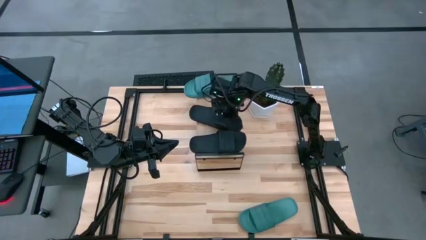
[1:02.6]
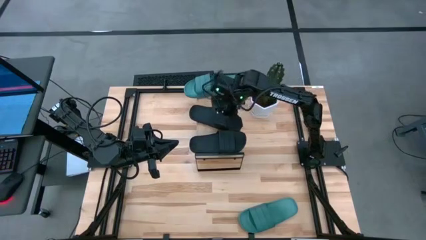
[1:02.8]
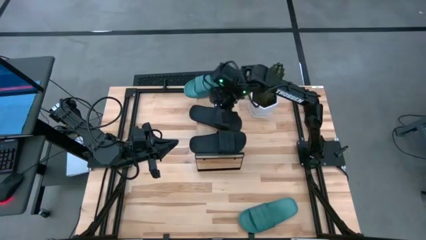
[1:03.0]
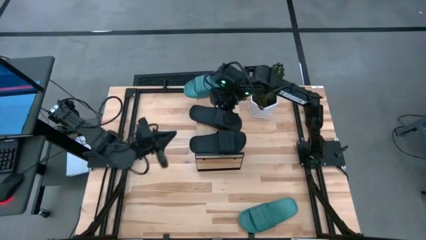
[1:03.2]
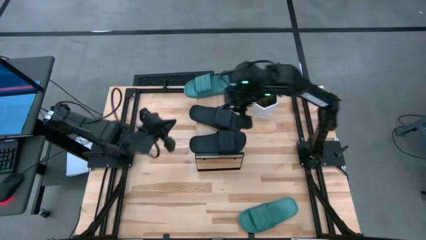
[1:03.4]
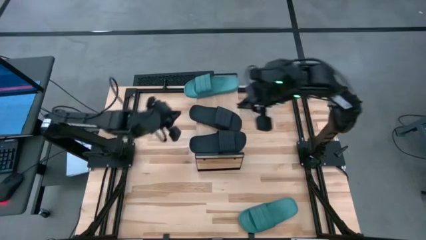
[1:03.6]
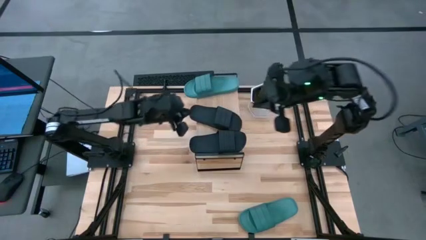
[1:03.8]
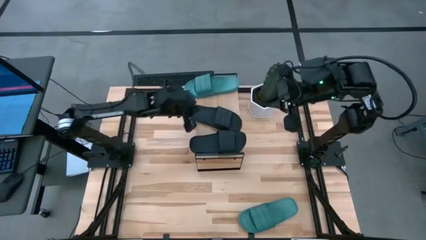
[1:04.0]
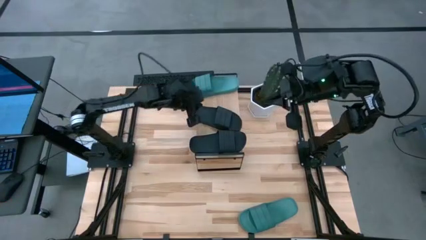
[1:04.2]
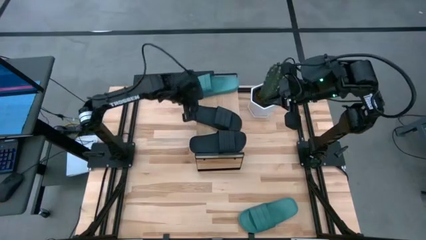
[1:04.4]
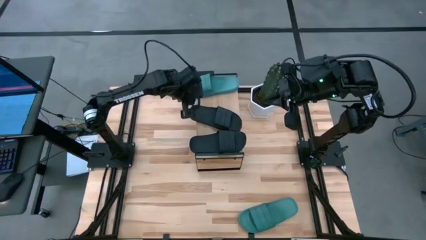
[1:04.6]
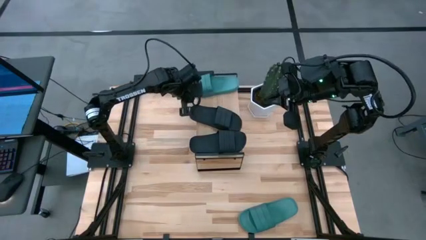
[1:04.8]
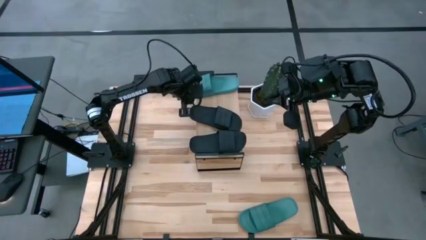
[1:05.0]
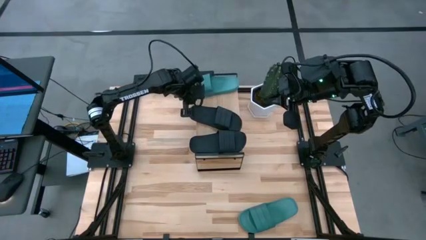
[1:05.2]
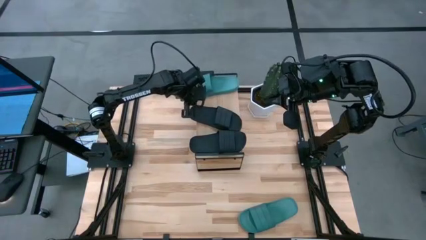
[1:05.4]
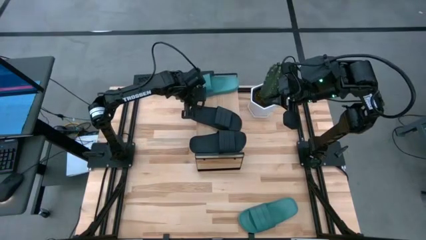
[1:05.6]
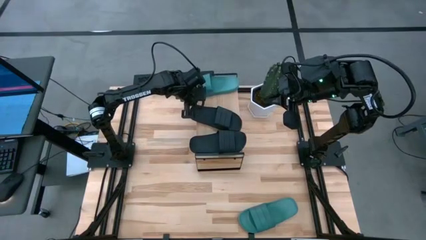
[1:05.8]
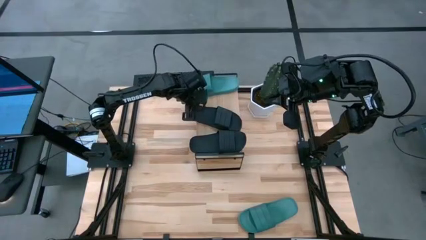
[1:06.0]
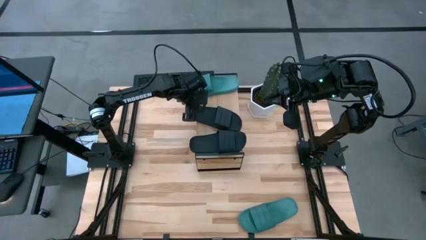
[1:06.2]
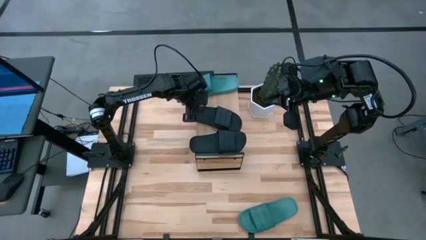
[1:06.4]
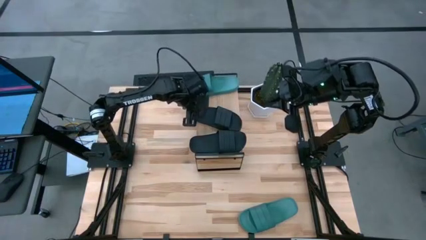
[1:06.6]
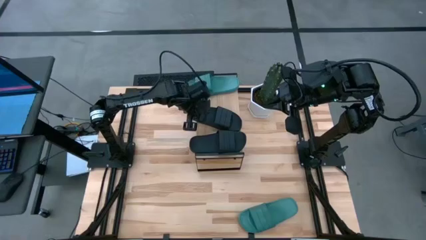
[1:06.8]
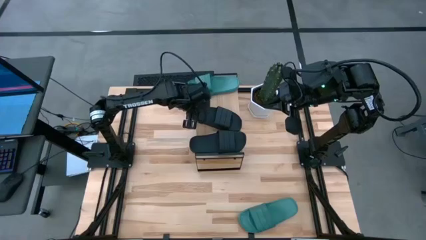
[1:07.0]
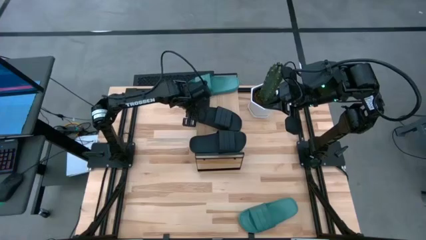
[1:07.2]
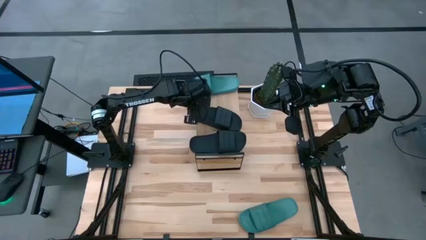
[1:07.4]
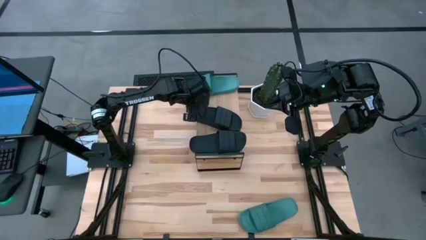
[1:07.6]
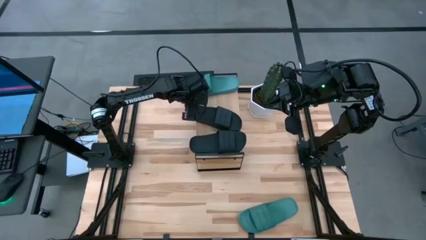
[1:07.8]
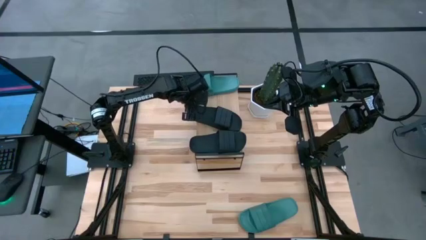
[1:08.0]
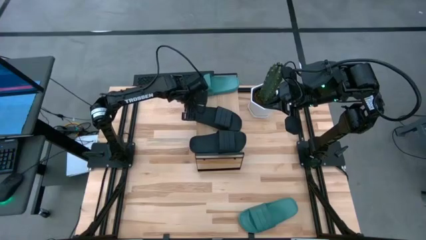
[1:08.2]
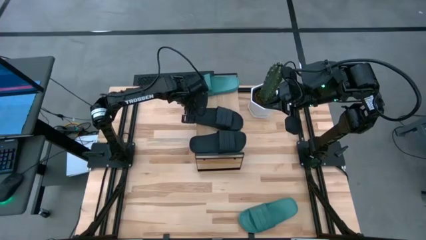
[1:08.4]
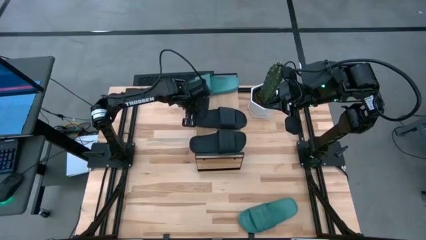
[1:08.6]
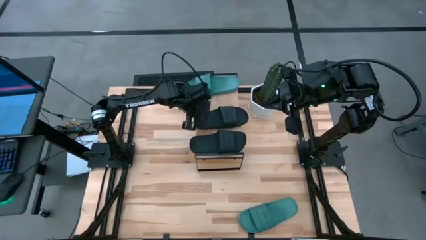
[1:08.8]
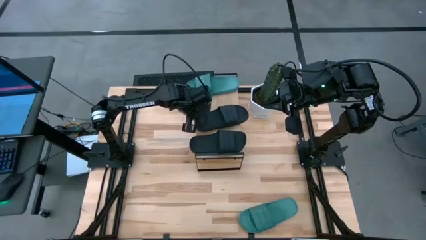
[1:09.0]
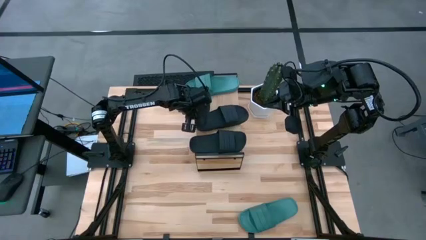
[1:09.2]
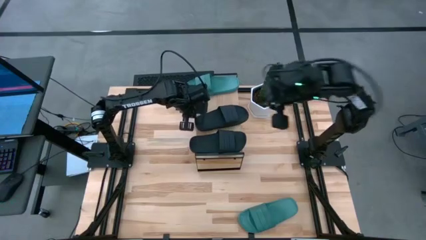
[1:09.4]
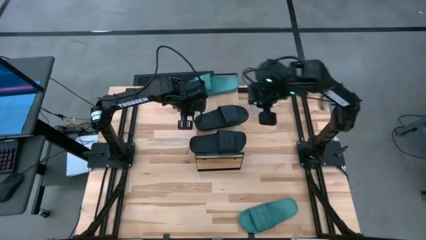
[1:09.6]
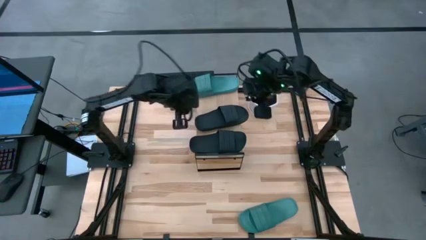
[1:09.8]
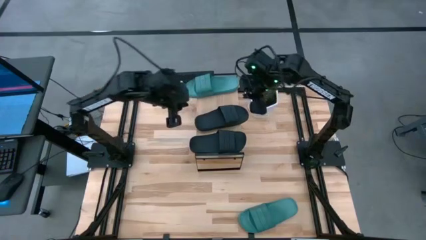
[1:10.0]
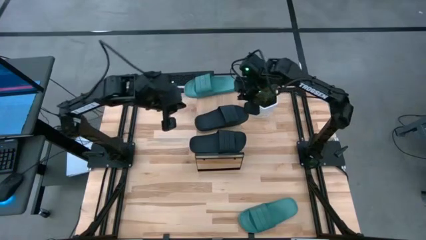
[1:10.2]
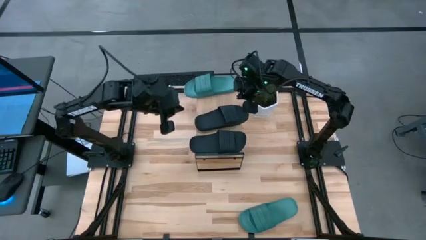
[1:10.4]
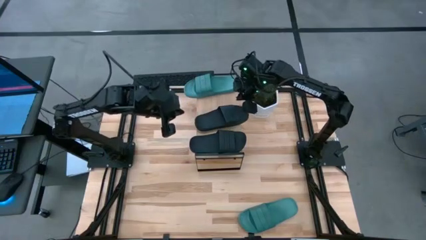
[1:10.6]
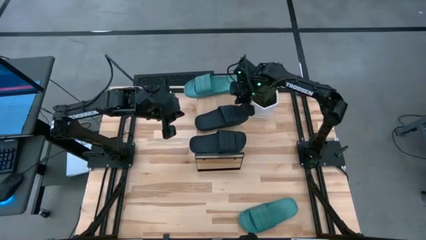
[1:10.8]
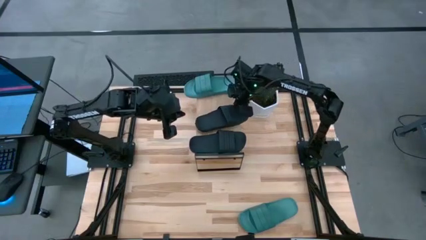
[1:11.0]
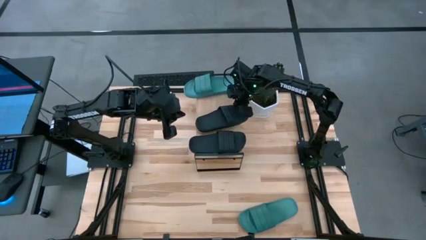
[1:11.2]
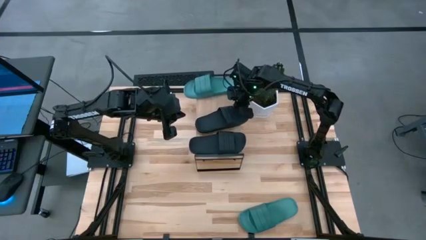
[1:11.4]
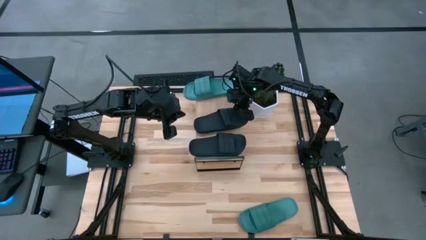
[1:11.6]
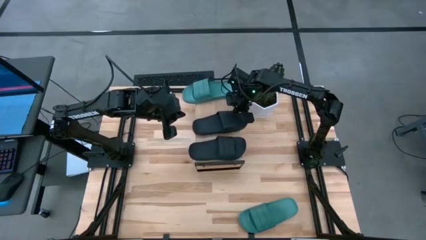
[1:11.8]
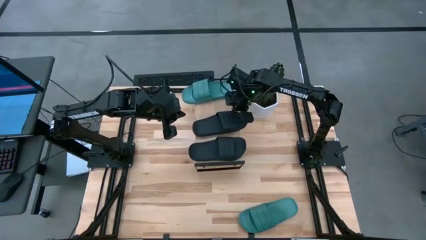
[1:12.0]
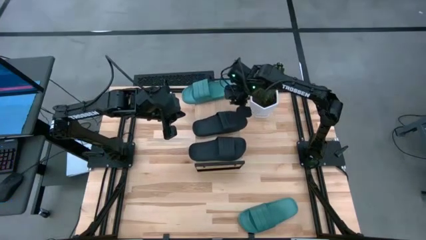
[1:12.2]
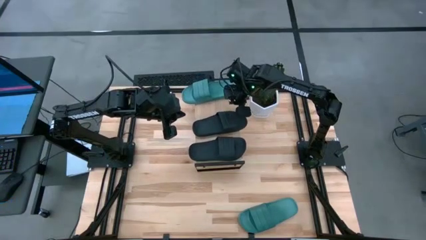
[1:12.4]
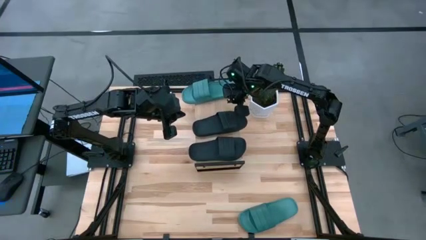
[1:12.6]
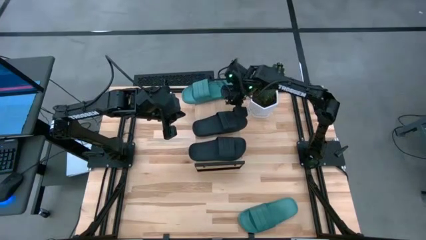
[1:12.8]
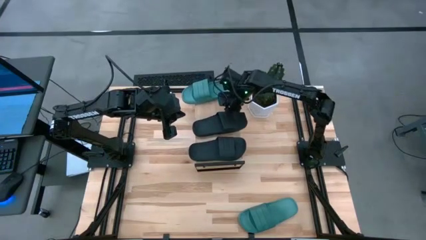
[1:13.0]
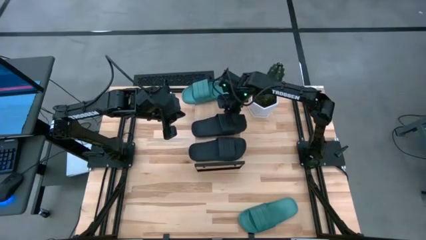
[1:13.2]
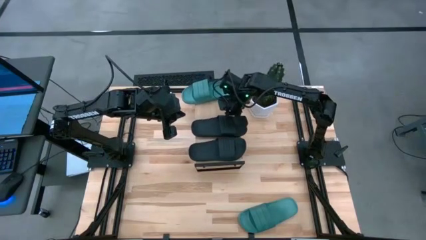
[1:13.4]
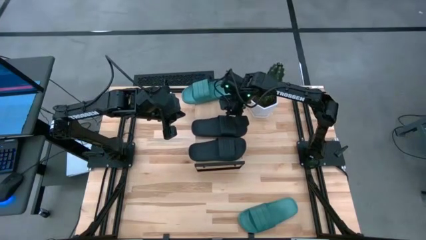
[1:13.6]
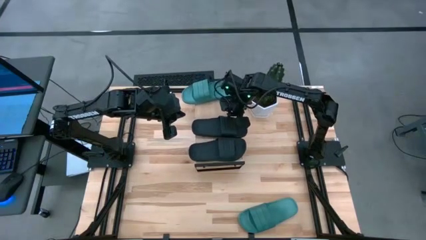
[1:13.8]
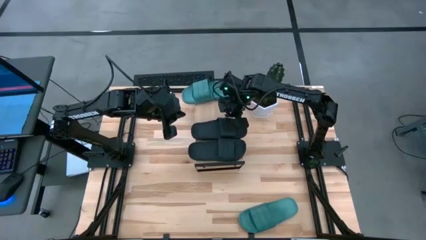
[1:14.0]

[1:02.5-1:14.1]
Task: Pick and place slides into the shelf
Adjust the top black slipper on the shelf

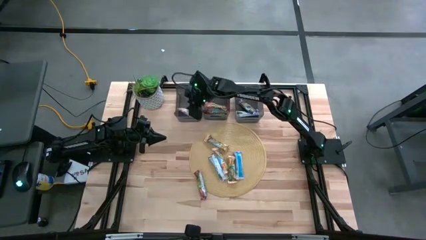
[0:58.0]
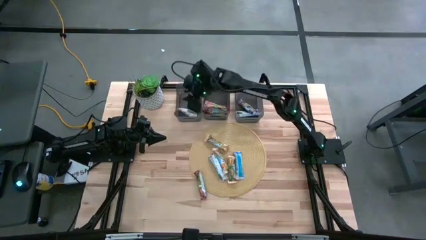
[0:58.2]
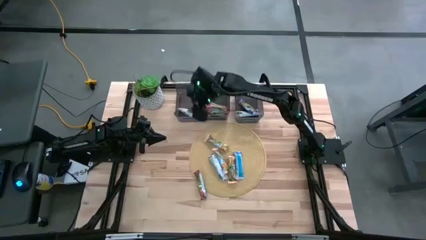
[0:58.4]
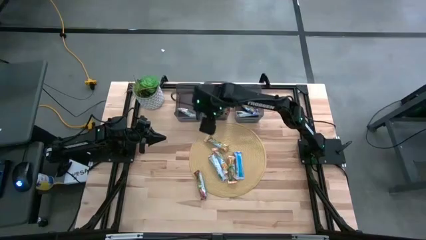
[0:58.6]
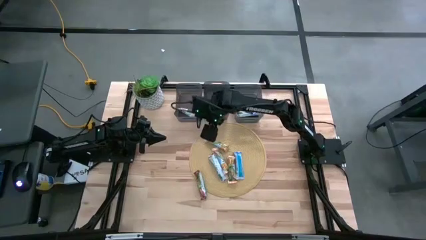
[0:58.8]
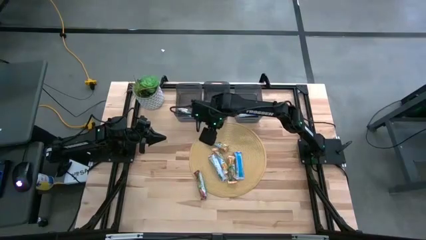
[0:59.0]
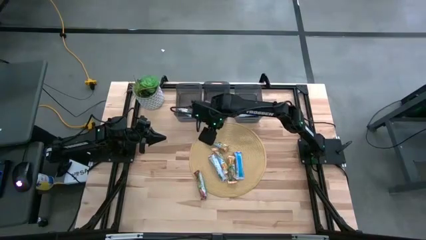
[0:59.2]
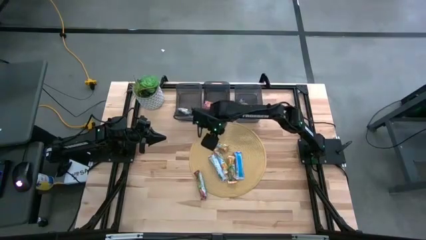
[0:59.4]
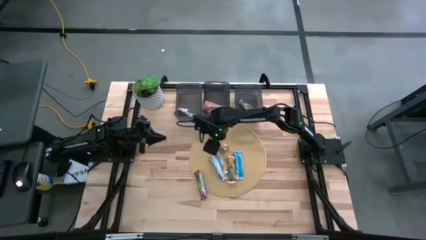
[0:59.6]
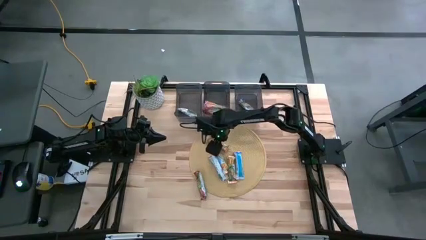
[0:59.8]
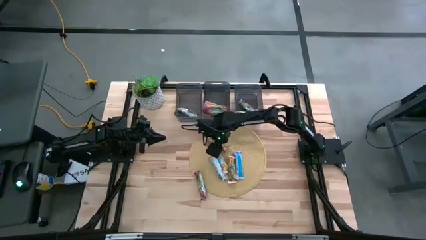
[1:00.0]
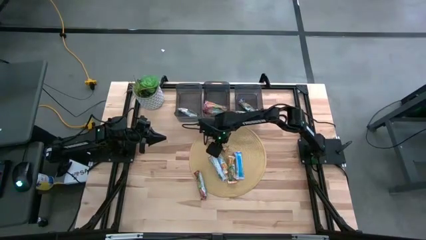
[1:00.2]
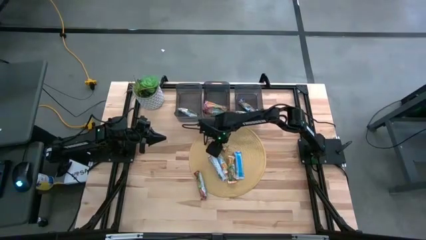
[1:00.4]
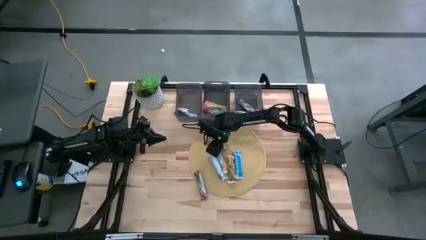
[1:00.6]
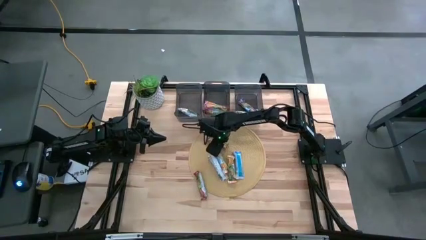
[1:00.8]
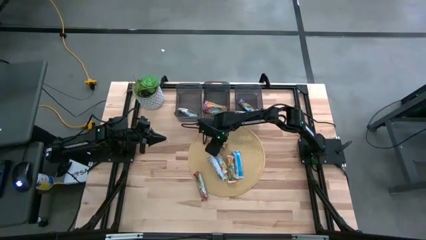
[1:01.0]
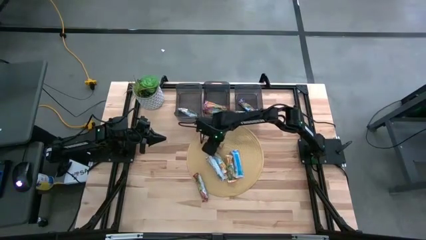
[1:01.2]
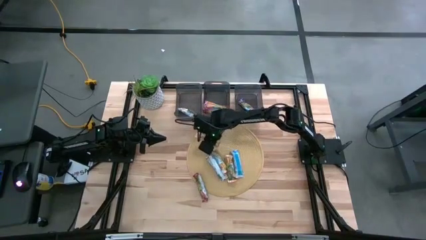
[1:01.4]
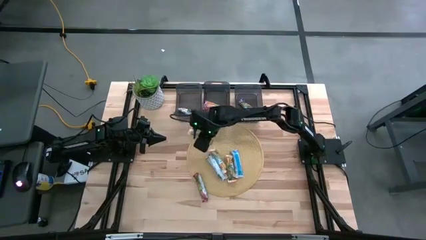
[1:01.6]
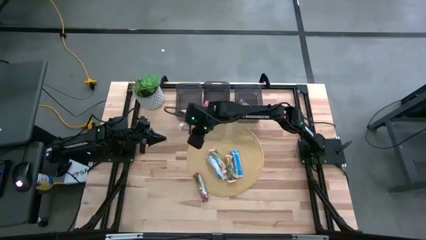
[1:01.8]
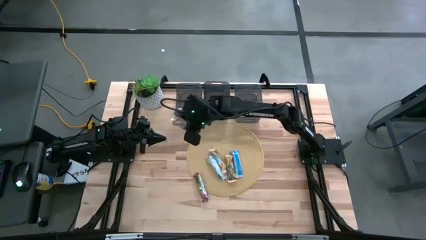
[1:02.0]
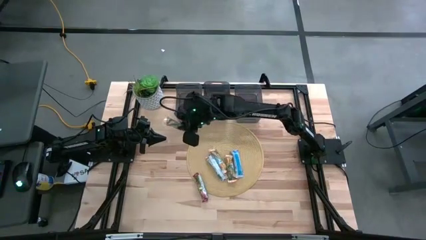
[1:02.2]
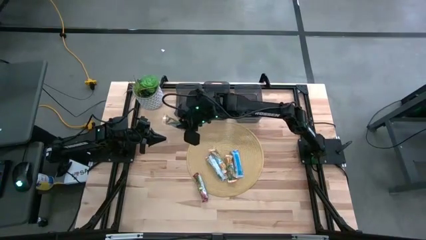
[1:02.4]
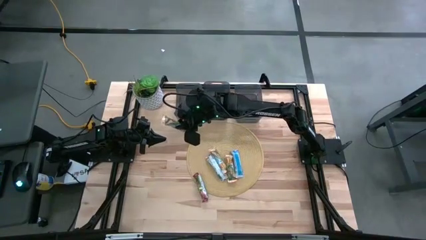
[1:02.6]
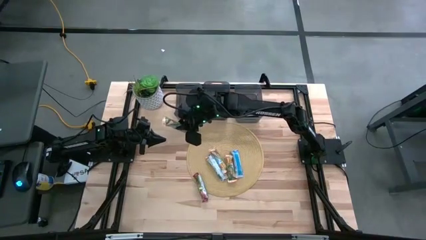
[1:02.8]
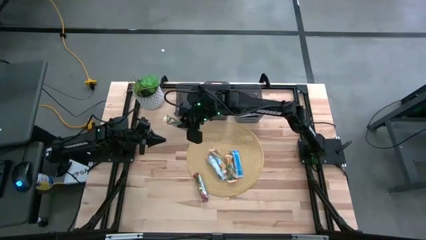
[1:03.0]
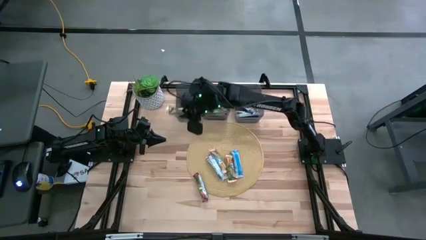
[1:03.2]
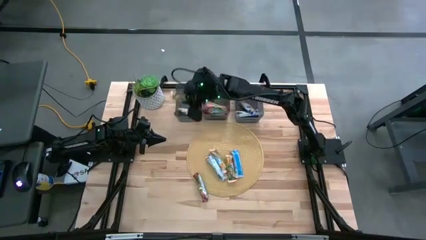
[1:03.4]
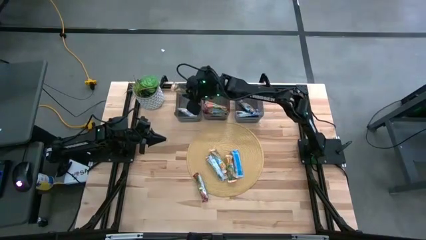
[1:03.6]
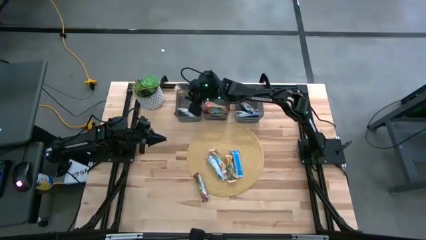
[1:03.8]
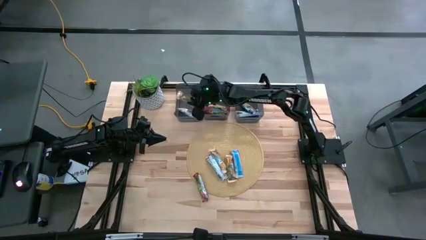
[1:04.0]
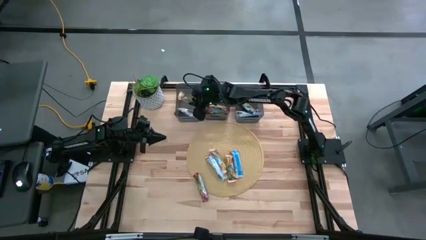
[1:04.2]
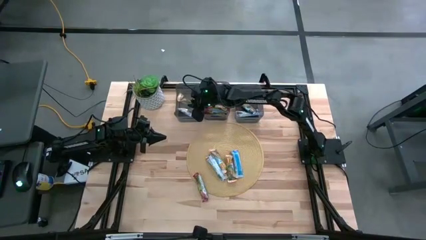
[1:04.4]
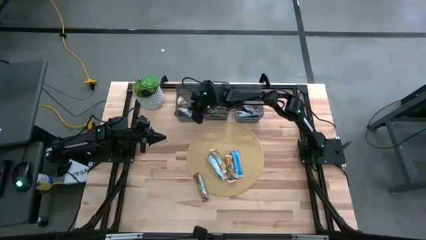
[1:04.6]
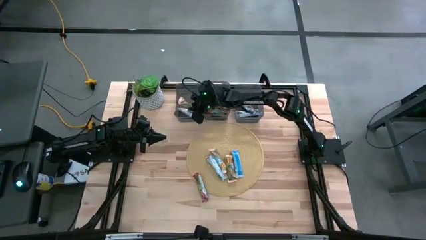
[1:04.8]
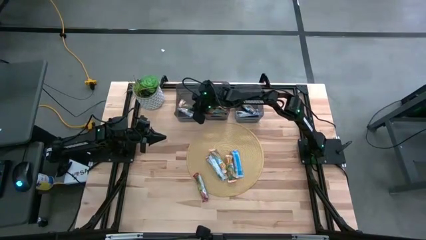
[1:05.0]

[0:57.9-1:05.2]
Task: Pick and place Granola Bars by type
Put the yellow granola bar into the left black bin
